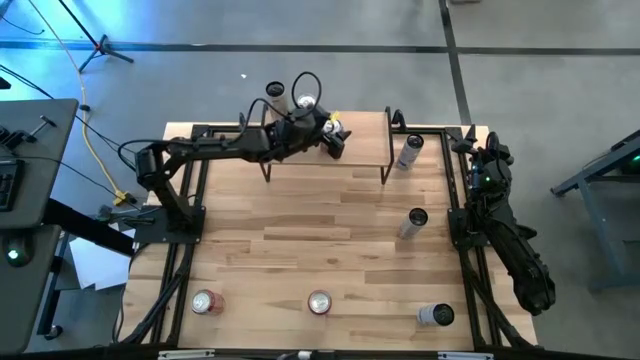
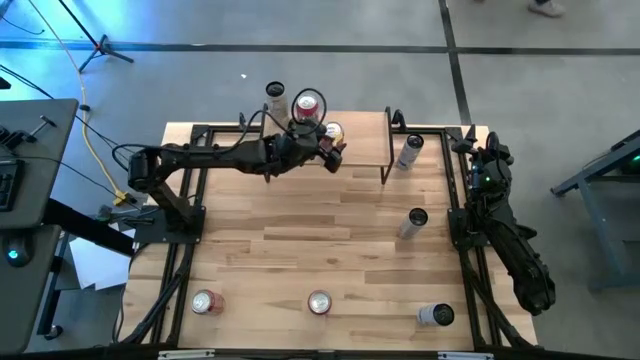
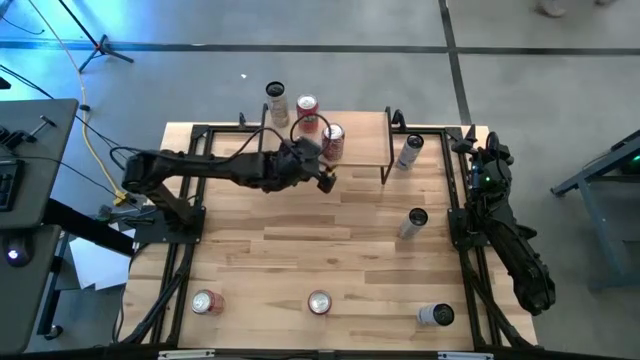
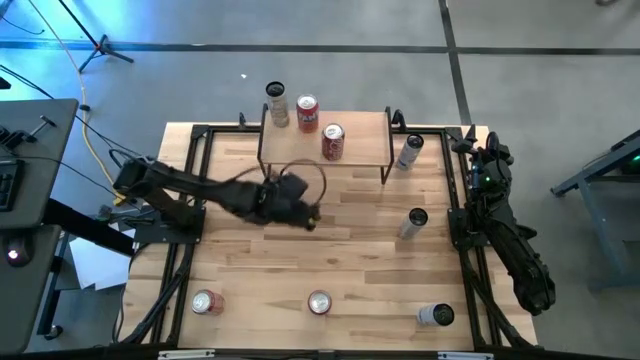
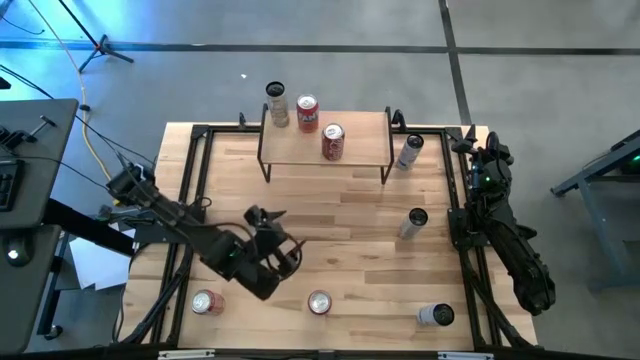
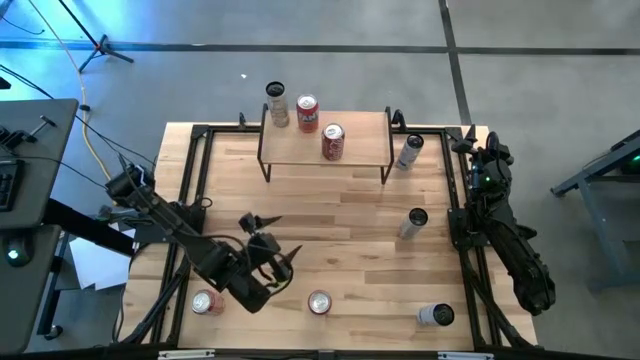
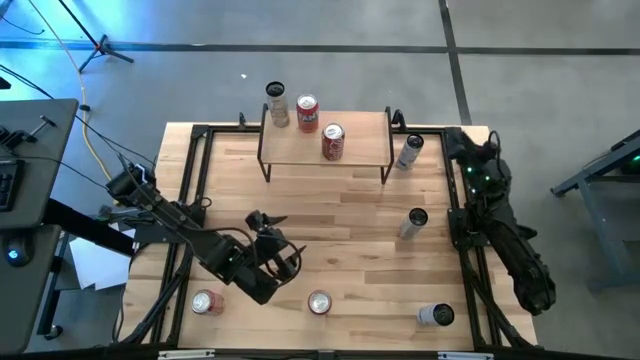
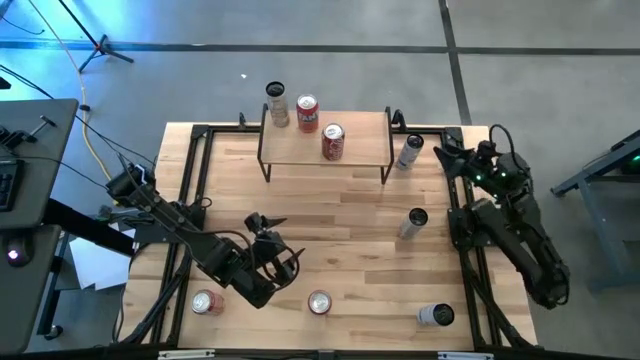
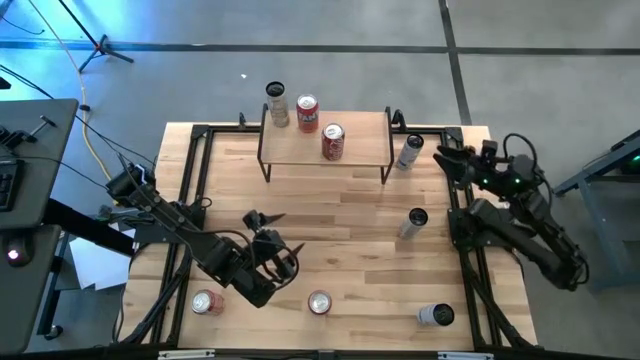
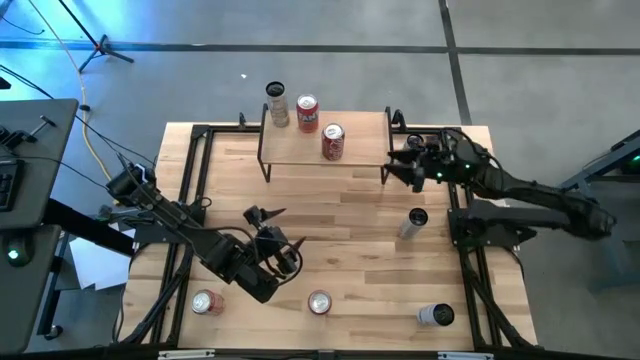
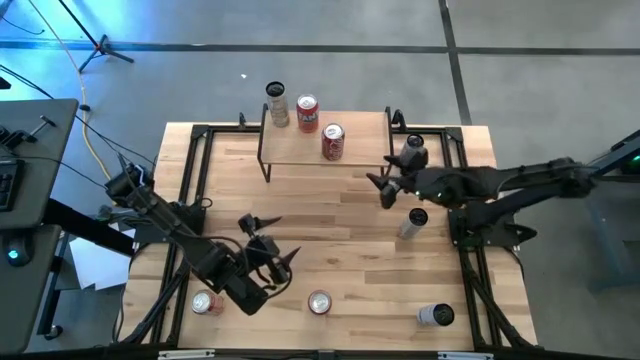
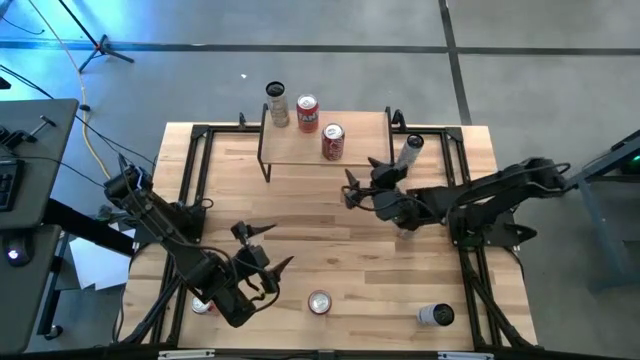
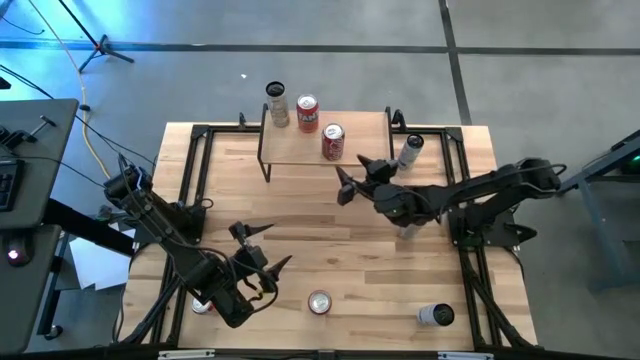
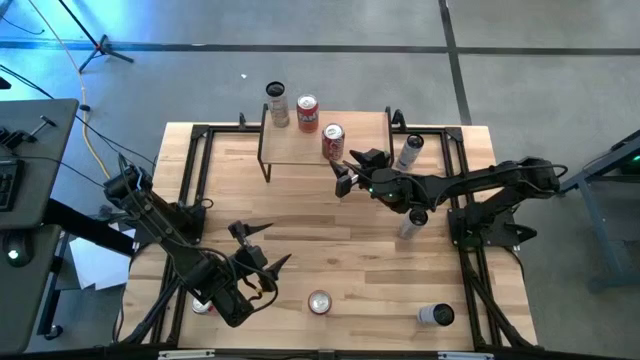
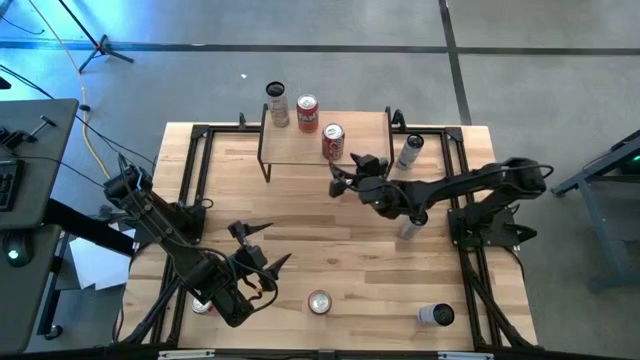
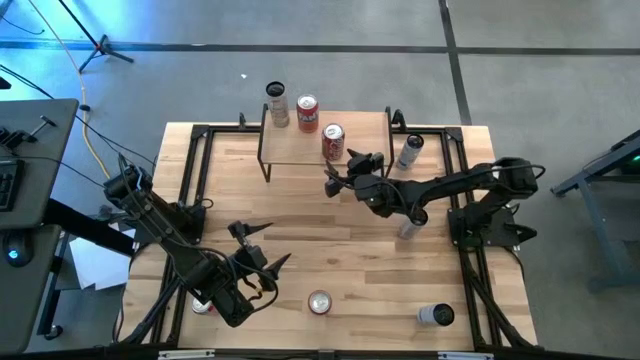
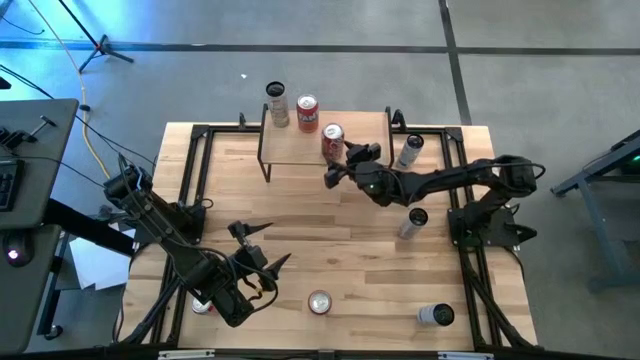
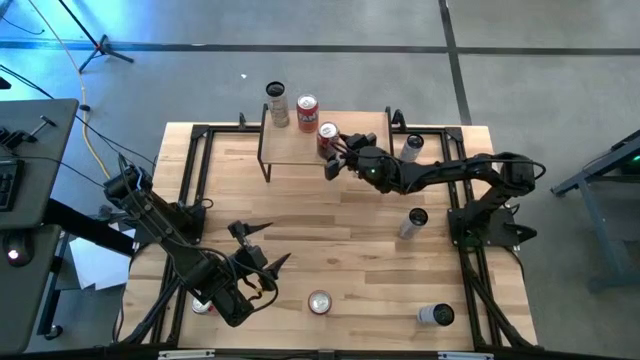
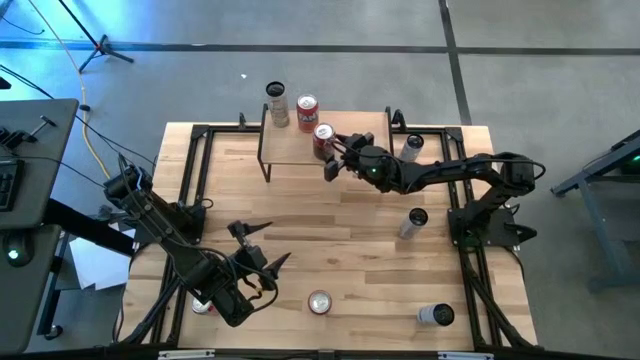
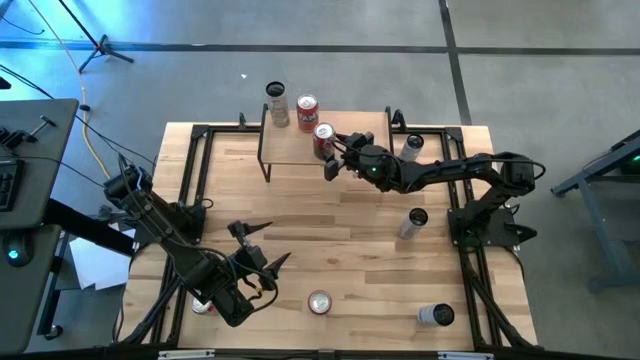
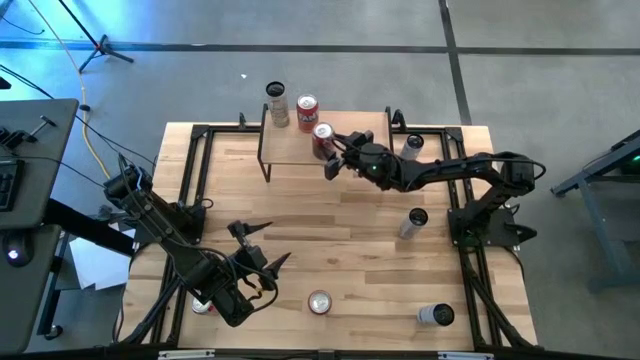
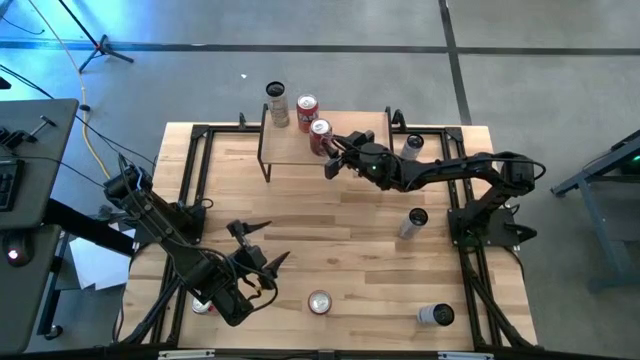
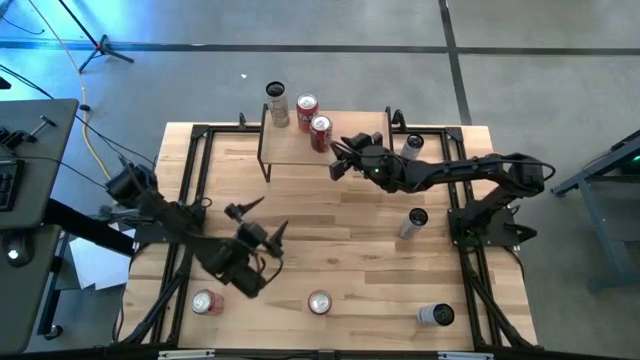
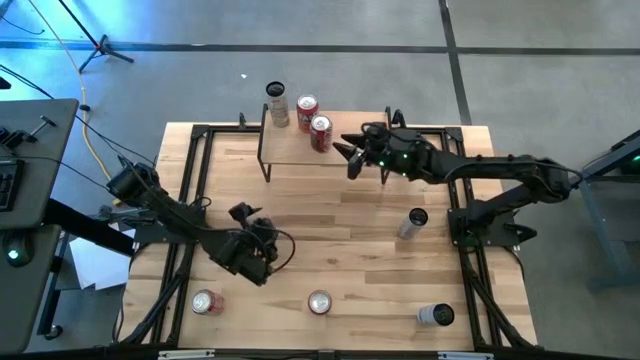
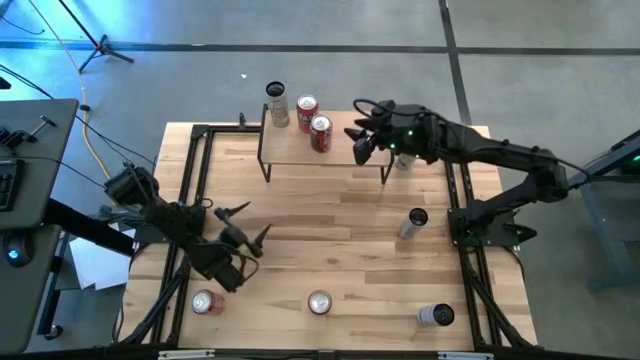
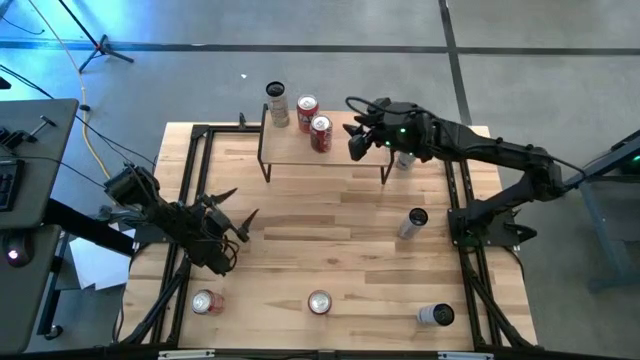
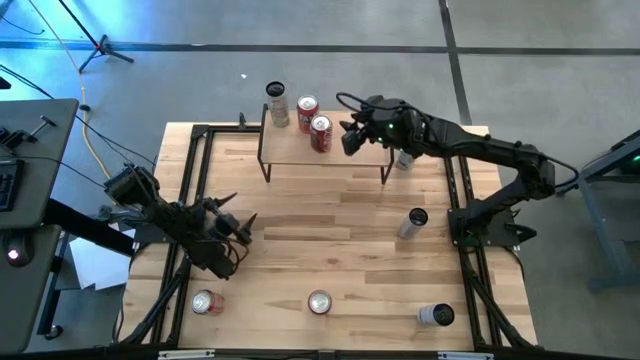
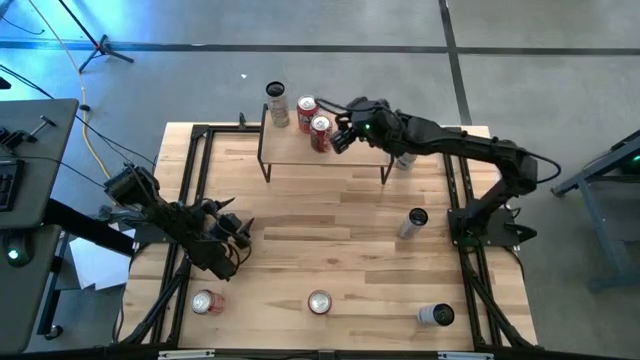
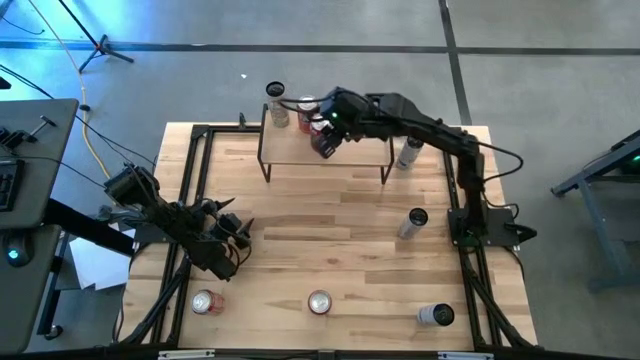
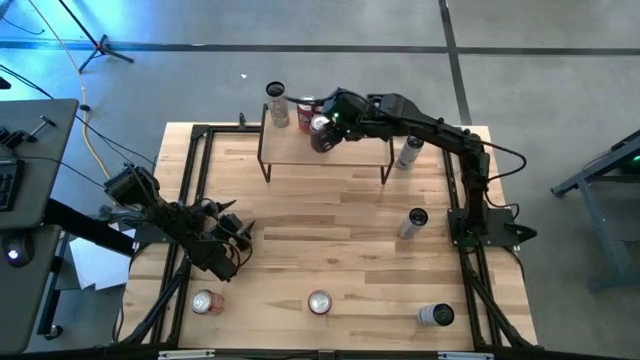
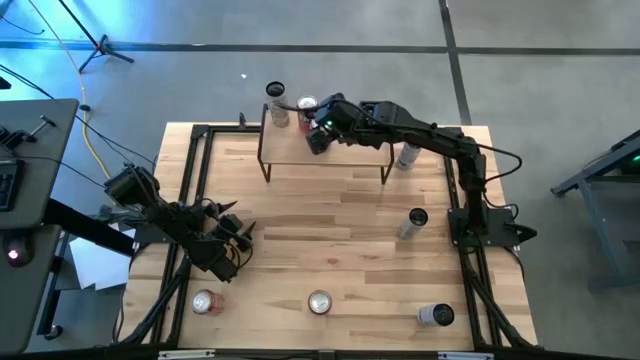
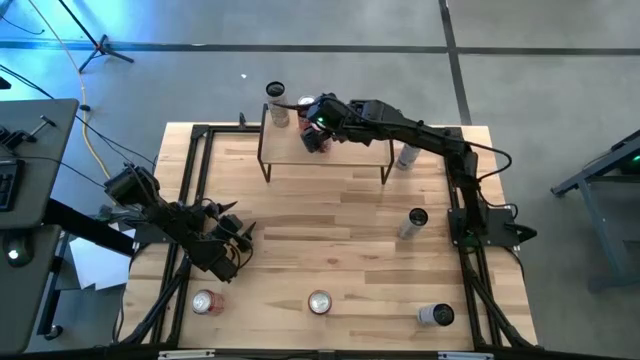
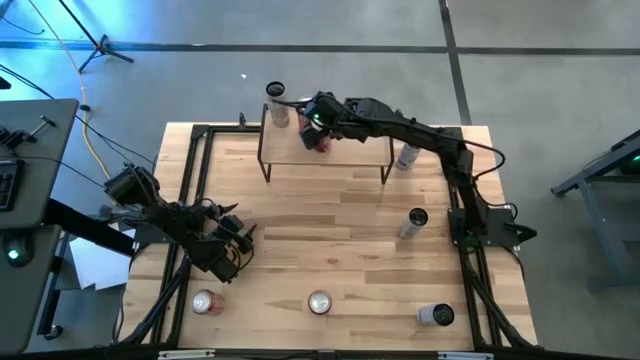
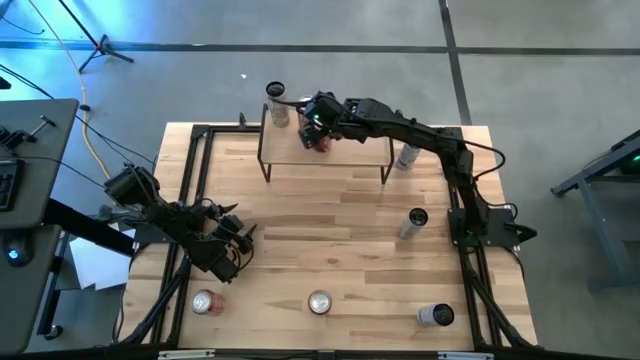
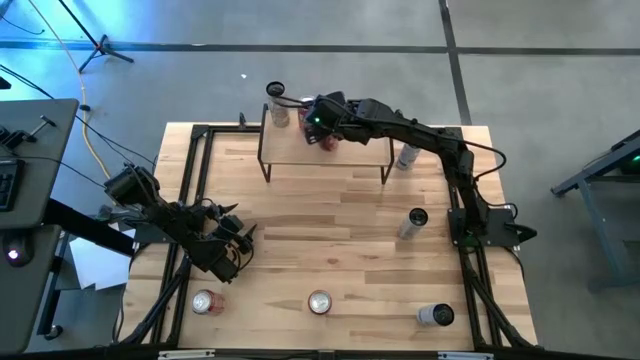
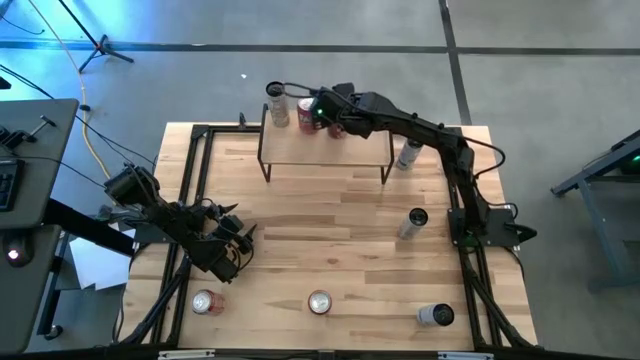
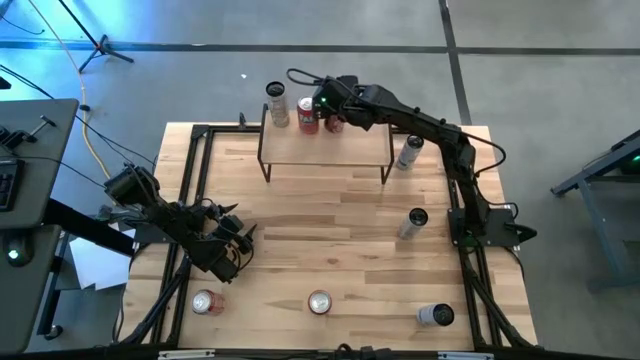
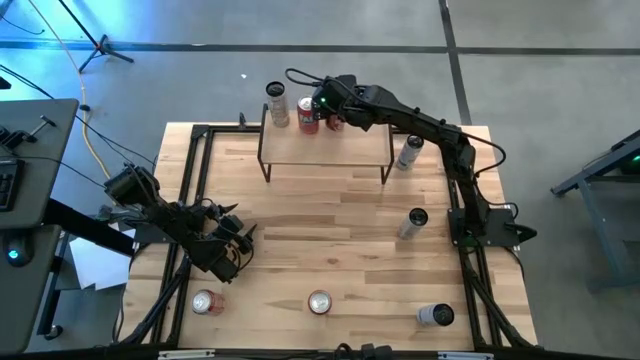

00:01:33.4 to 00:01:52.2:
Task: Place canned beverage on shelf
Put the red and white soda can on the shelf

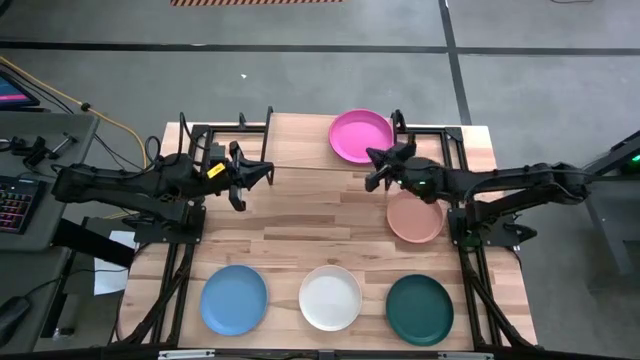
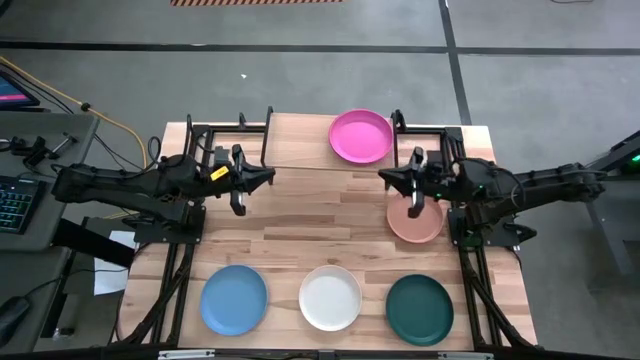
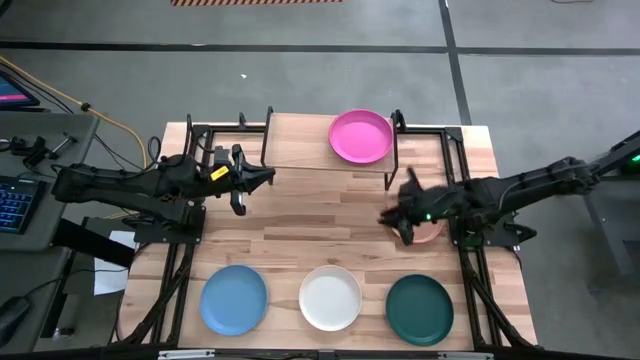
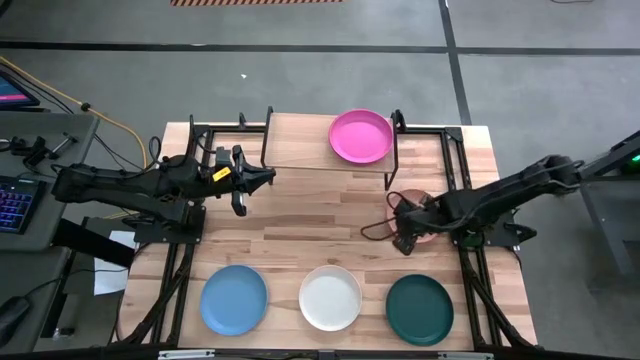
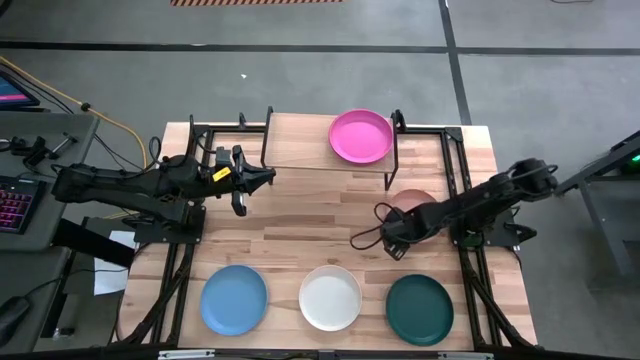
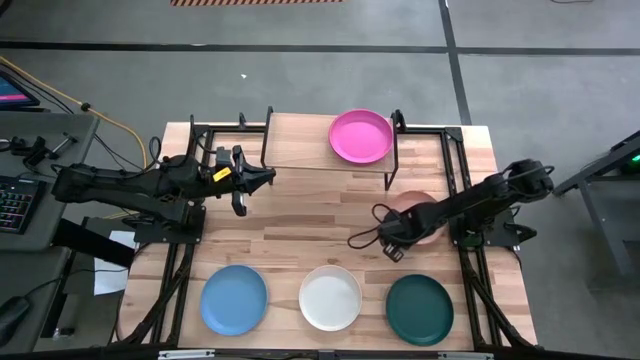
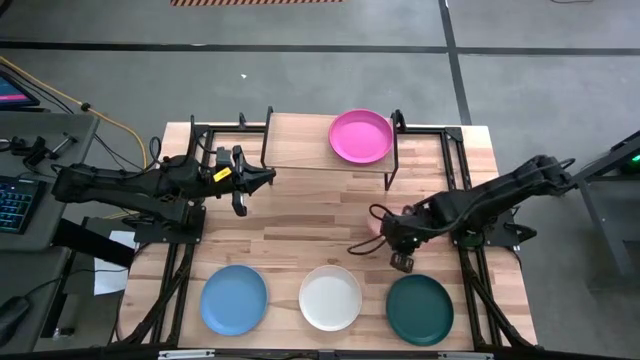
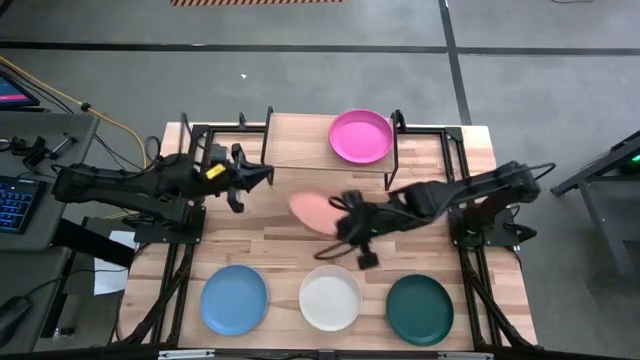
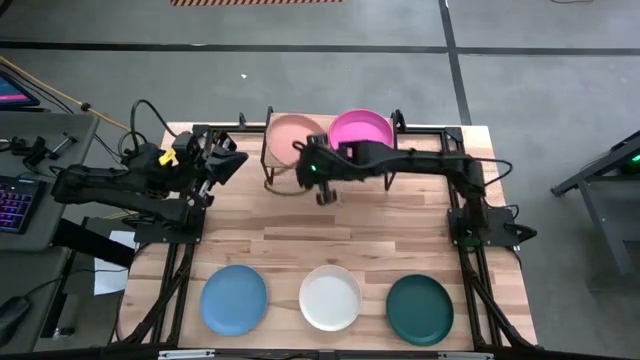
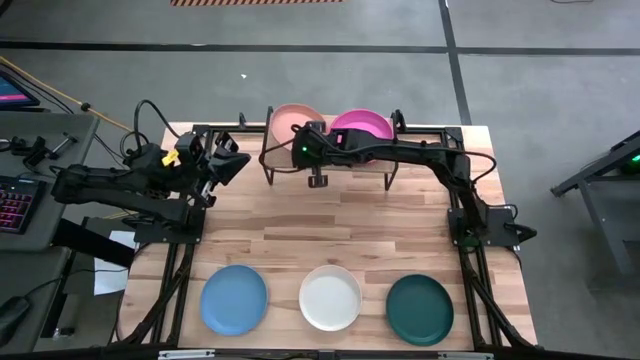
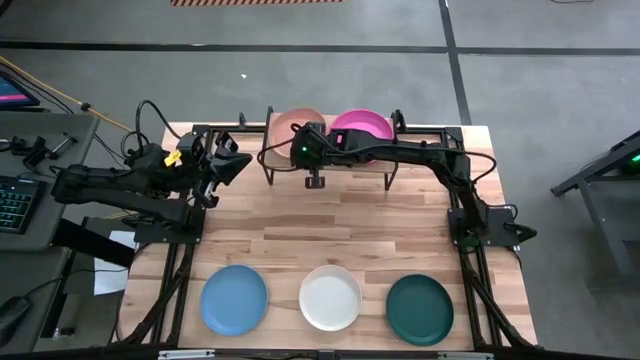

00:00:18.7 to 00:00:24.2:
Task: Place and stack plates onto a shelf
Put the brown plate on the shelf
